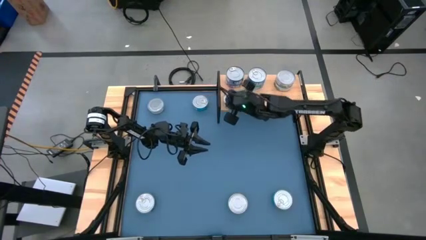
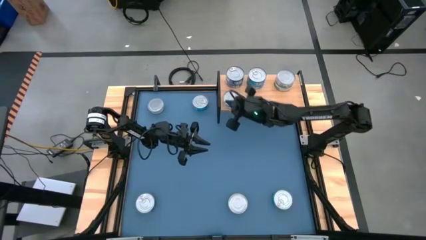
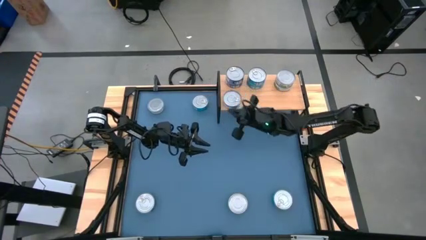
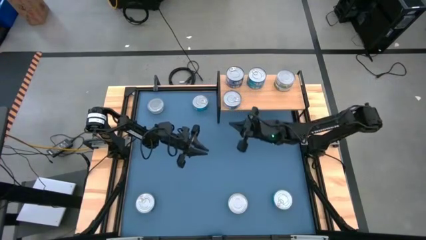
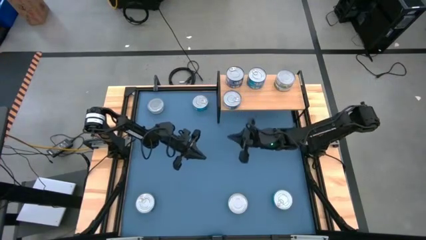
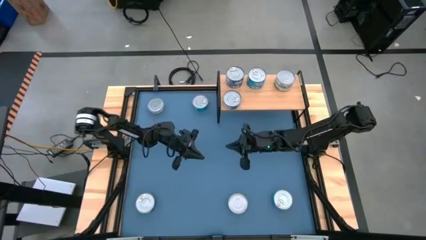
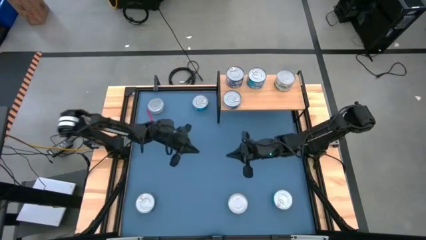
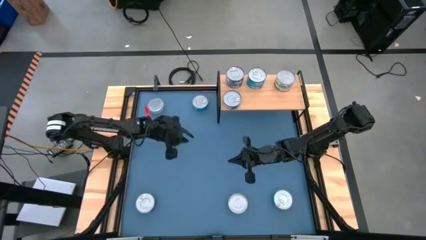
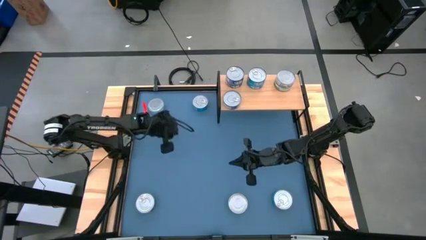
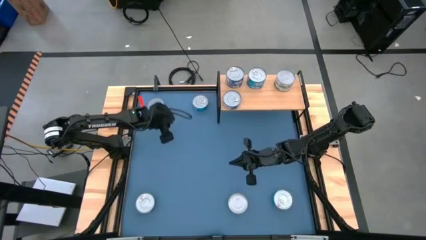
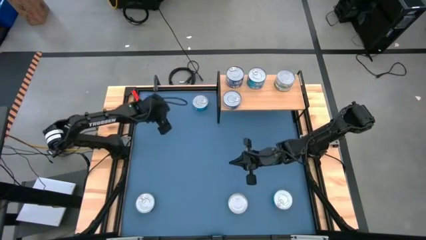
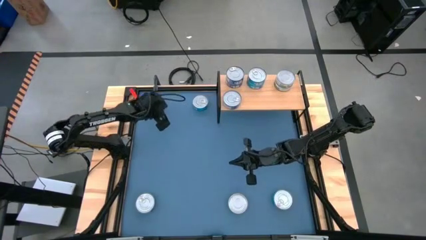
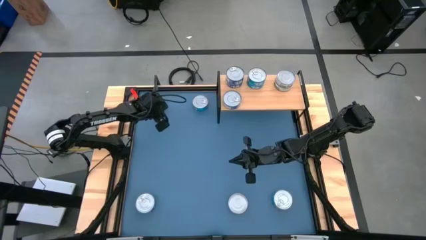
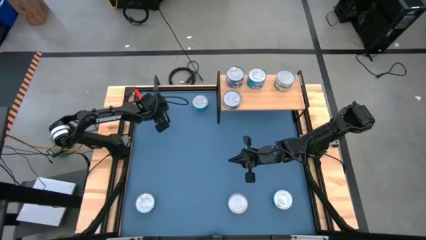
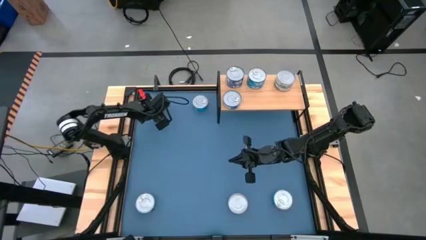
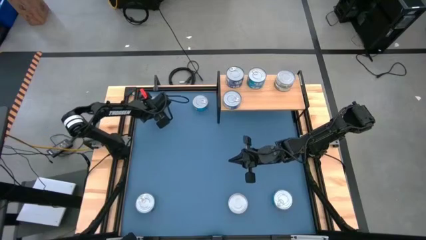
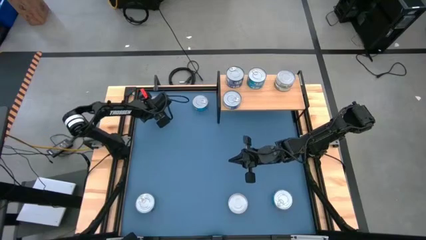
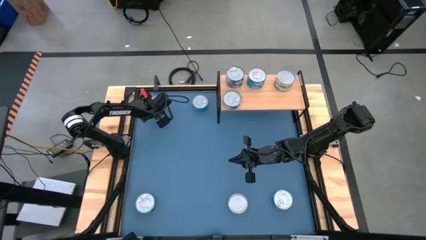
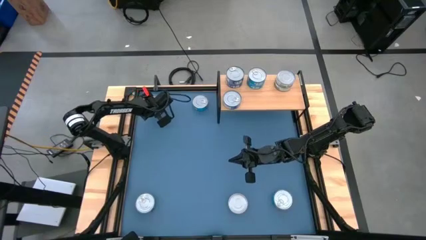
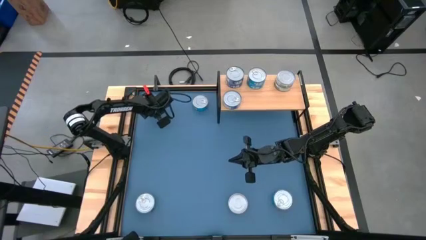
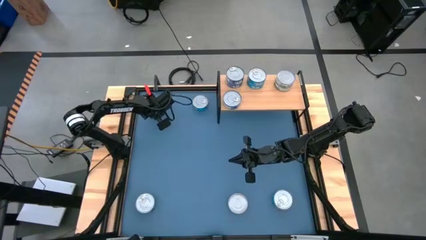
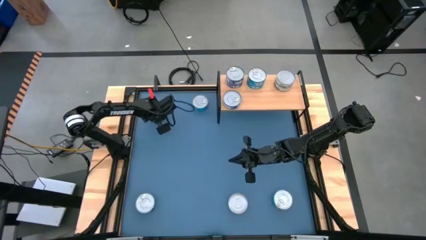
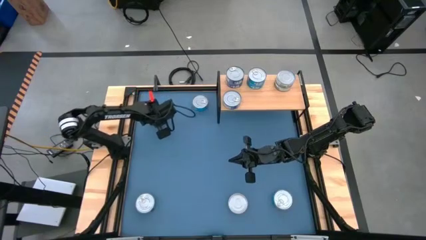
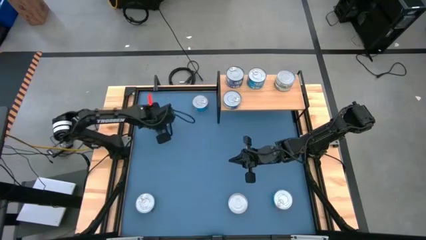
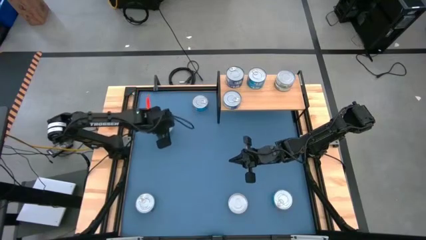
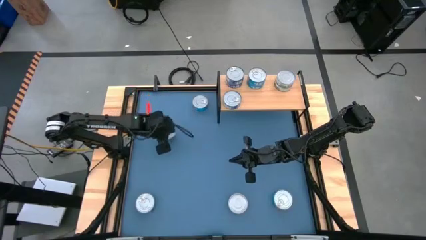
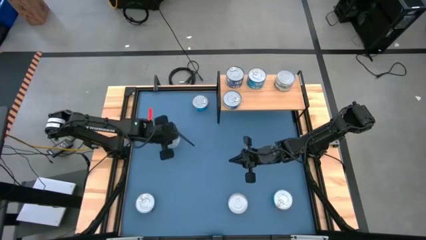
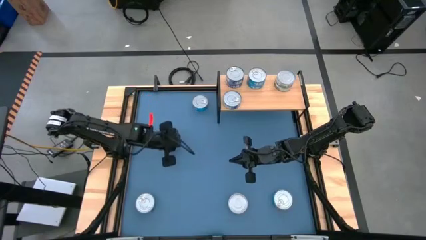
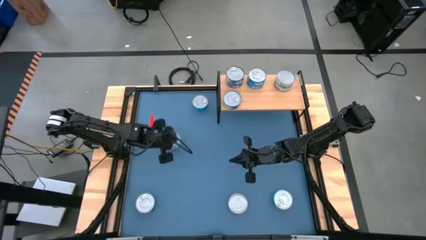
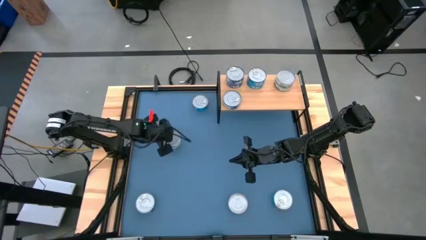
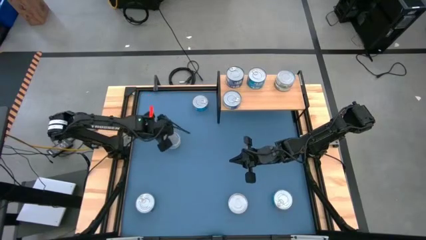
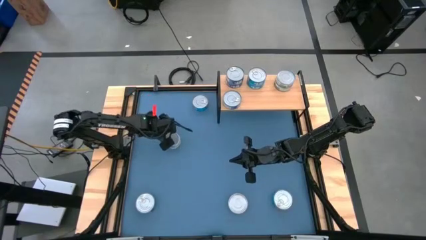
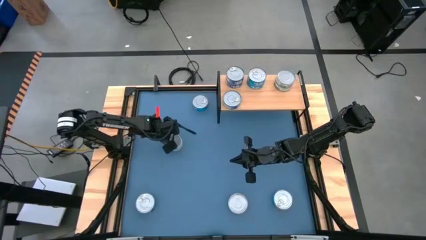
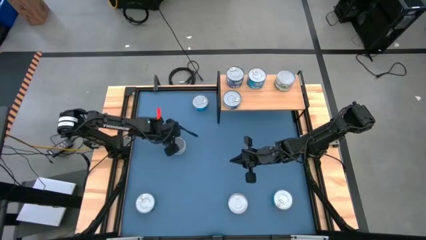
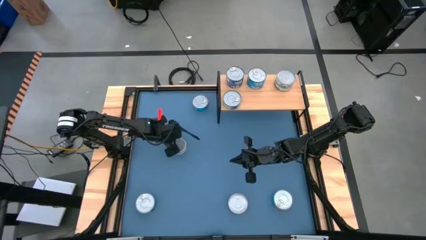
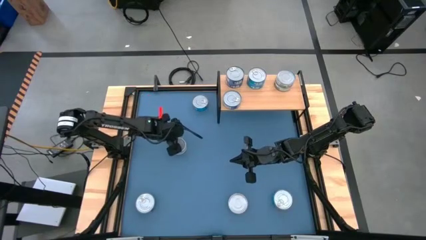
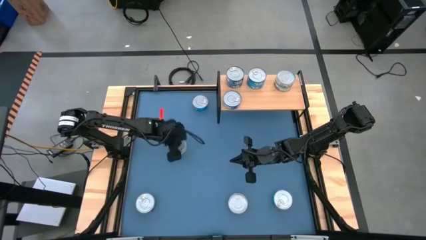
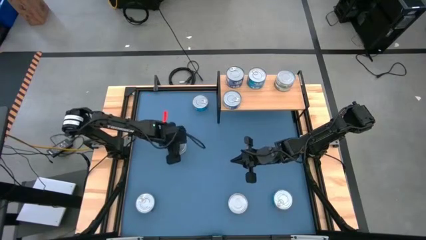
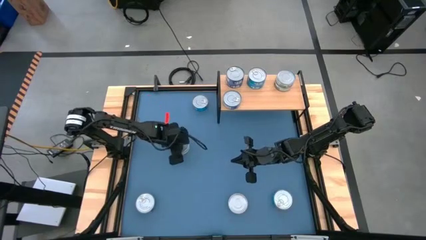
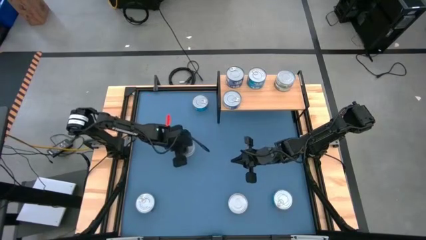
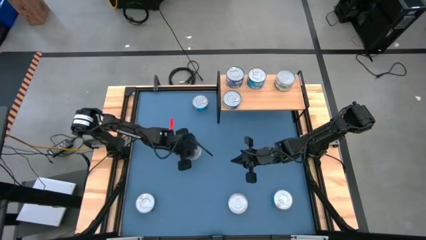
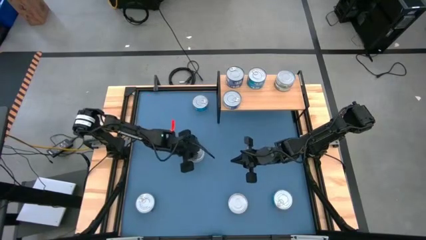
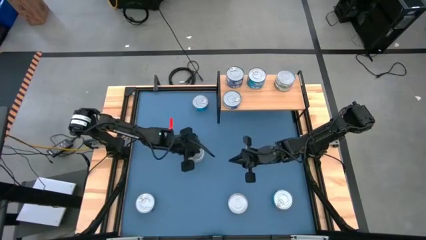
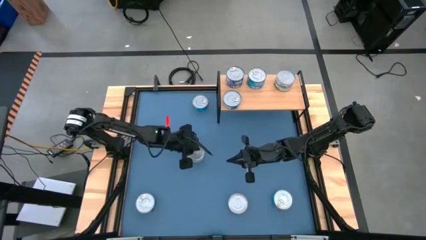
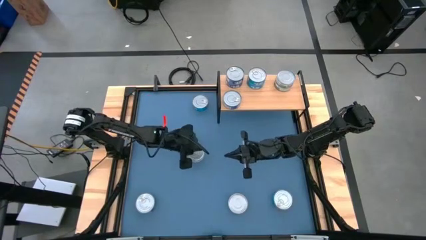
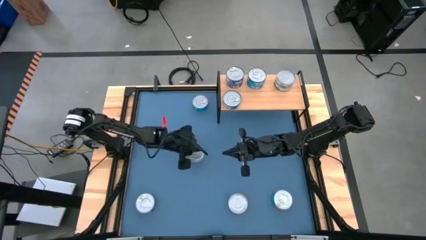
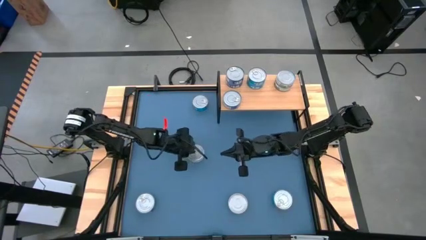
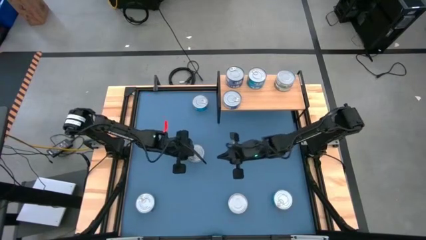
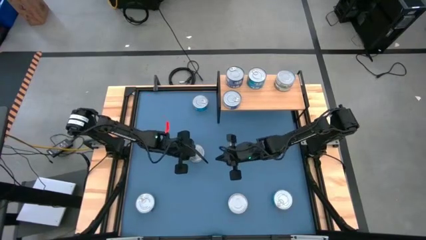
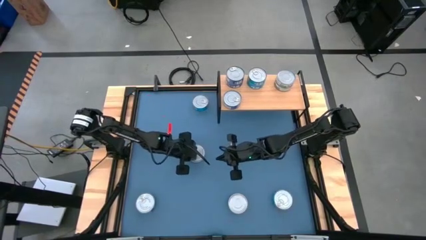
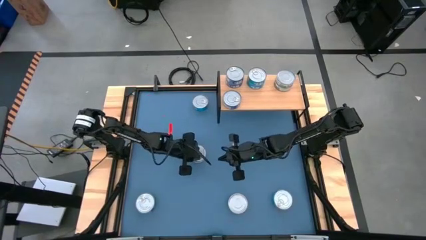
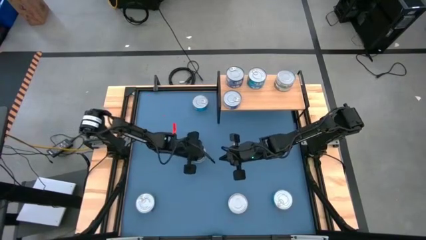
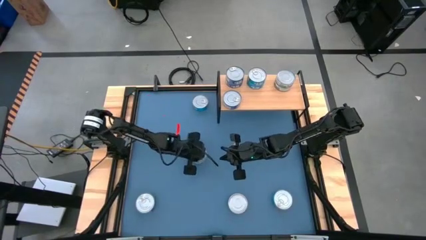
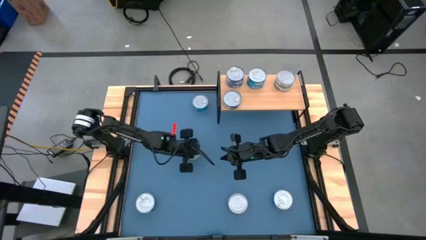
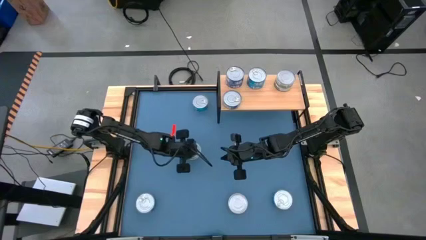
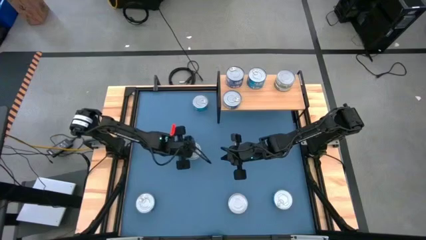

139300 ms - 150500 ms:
Task: Stack canned seafood by type on shelf
Put the left green tuna can on the shelf aligned with the other green tuna cans on the shelf

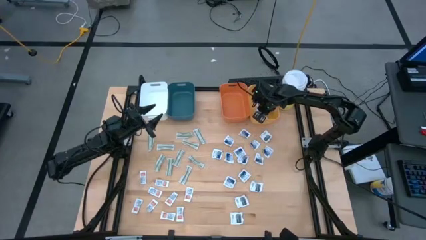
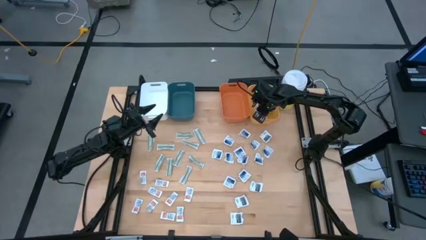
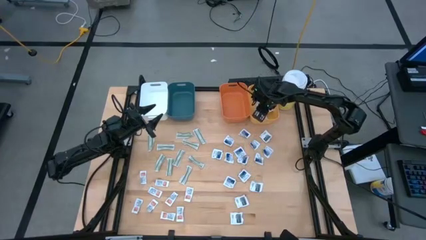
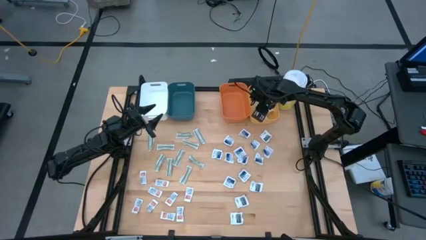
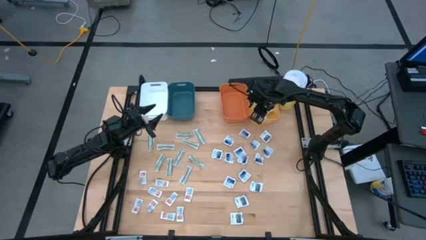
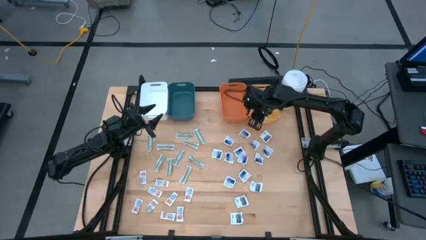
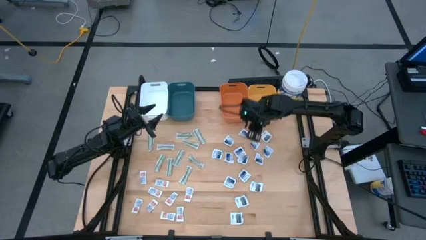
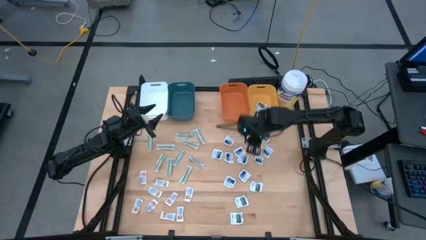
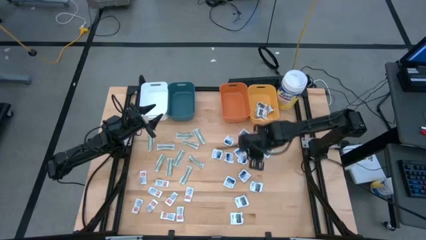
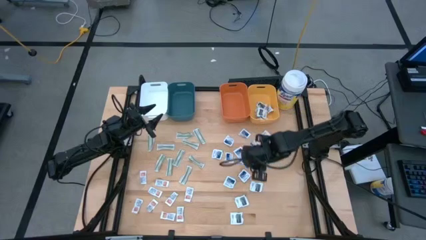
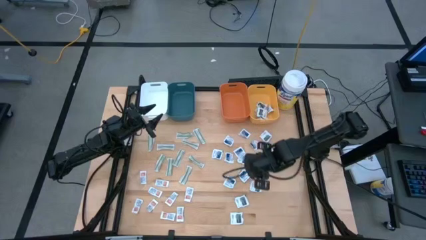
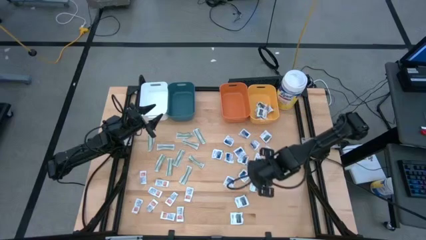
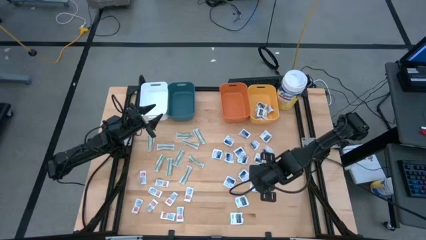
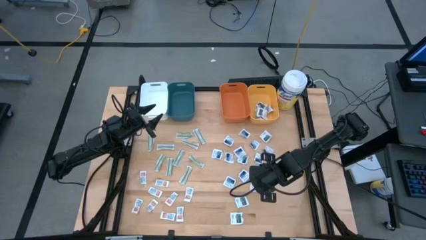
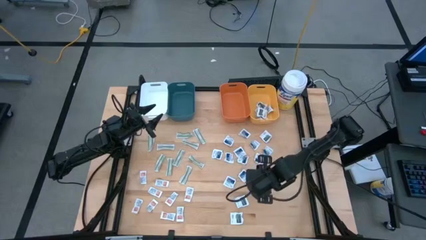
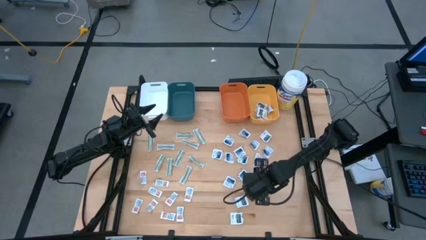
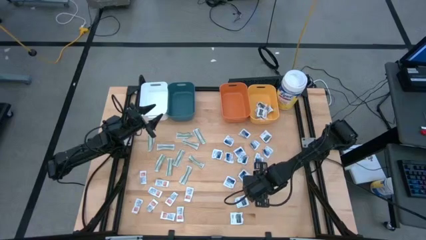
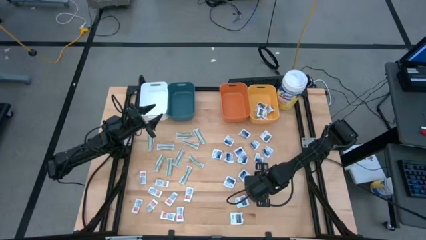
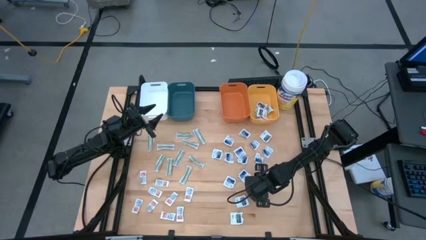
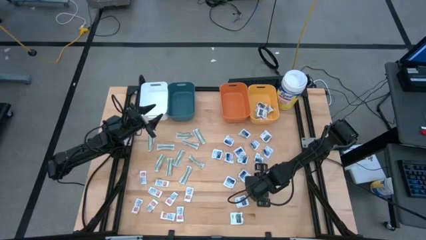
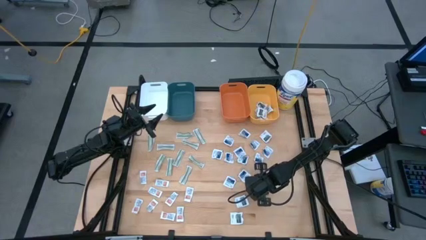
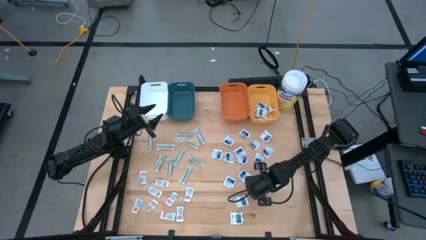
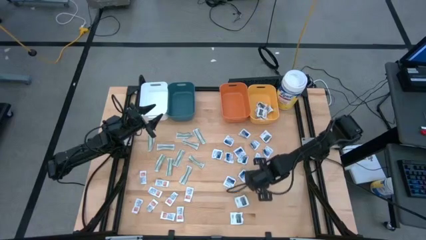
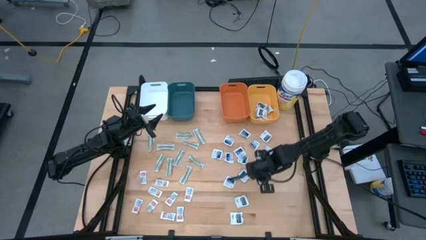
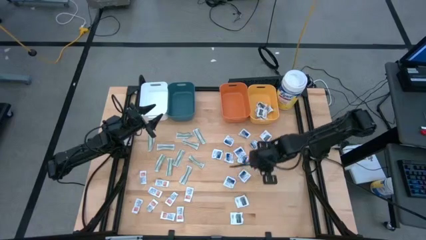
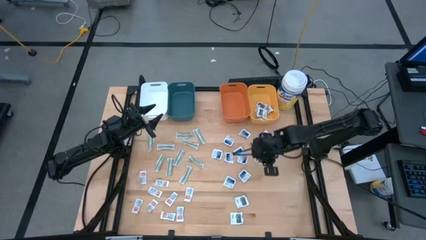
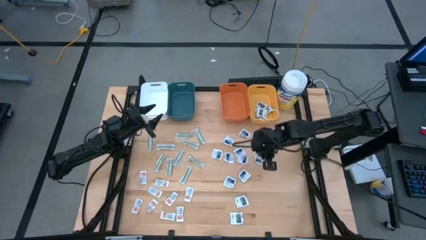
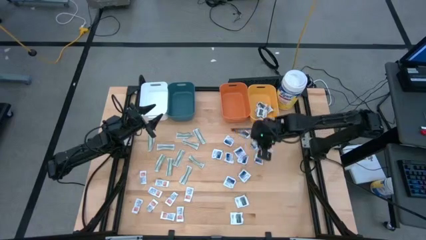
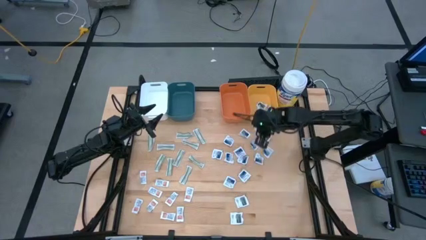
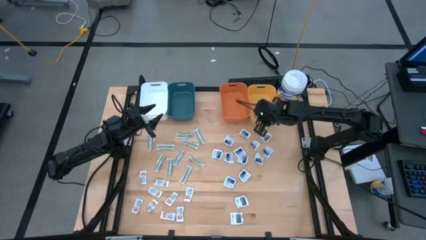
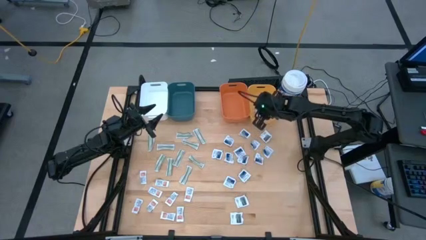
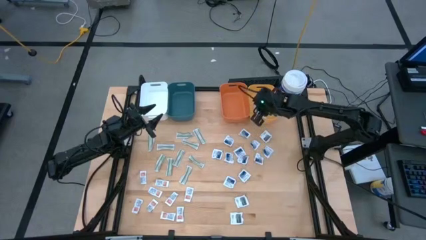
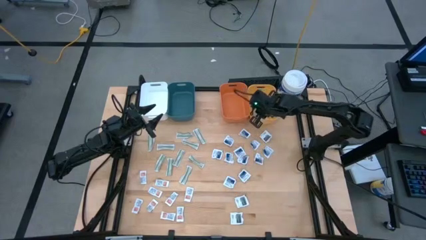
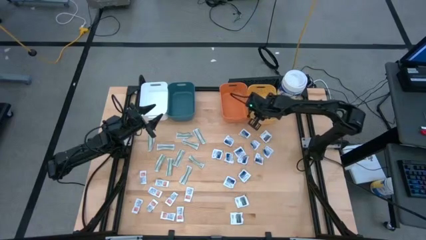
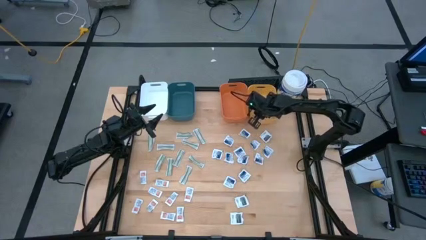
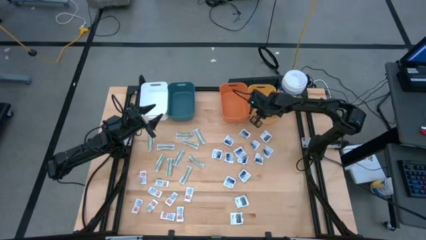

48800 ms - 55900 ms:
Task: Pick & Place First Aid Supplies
Put the towelette pack into the yellow bin
